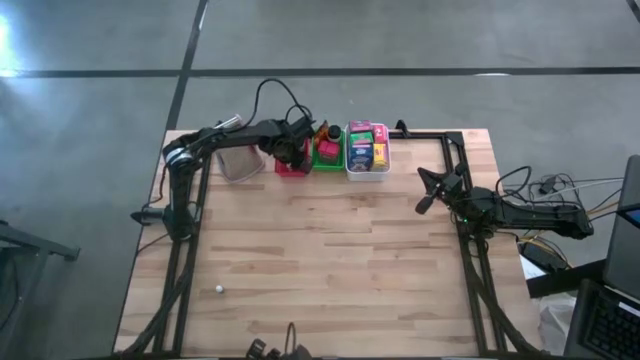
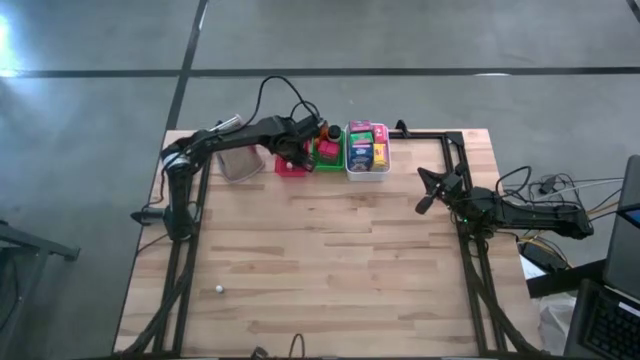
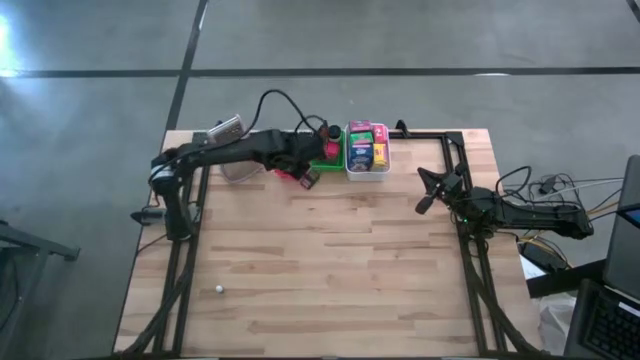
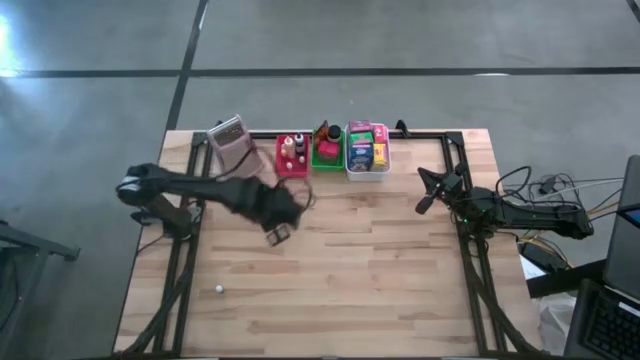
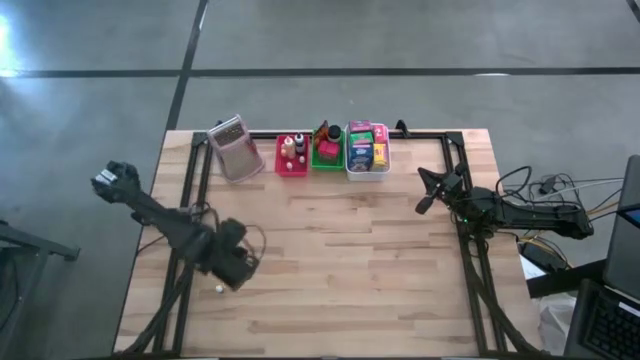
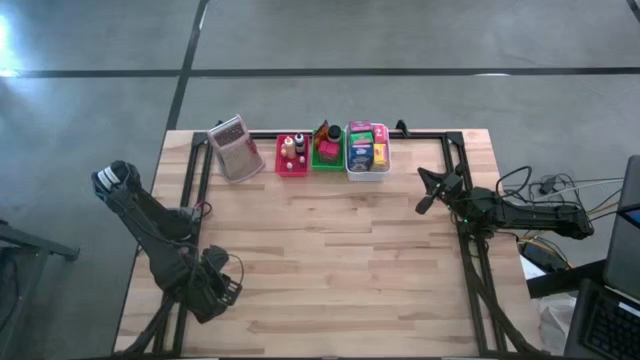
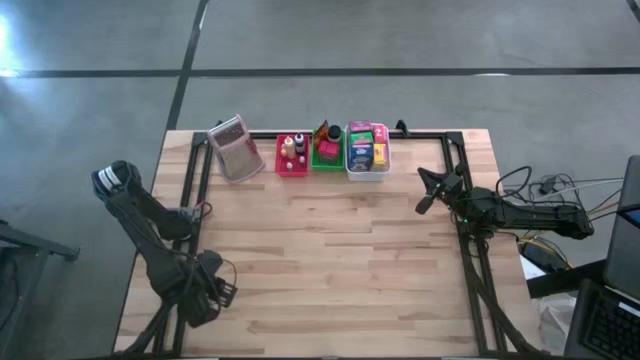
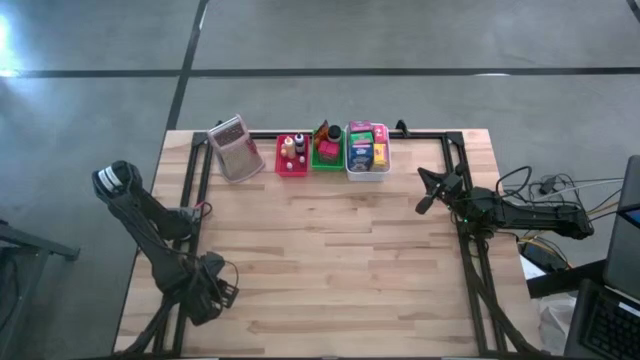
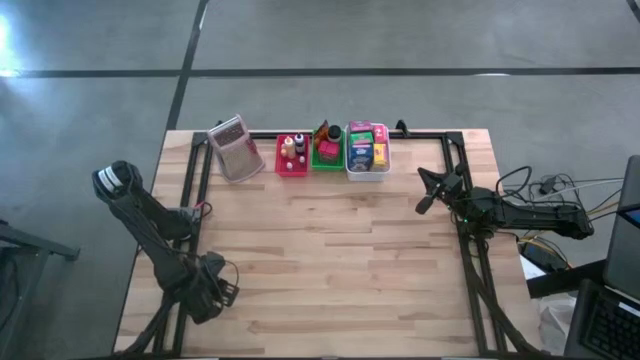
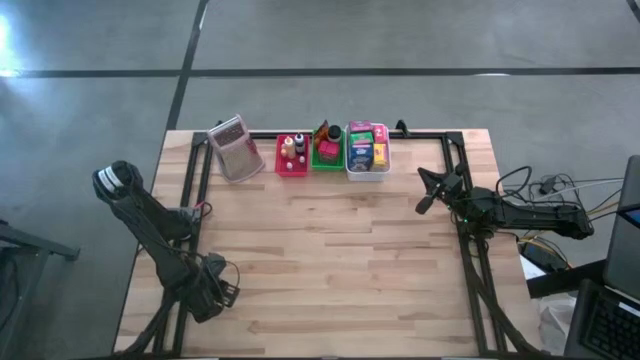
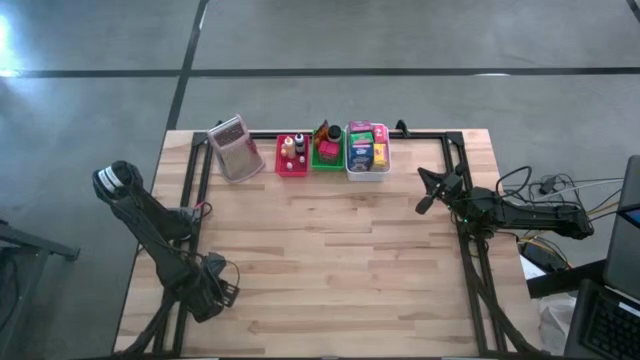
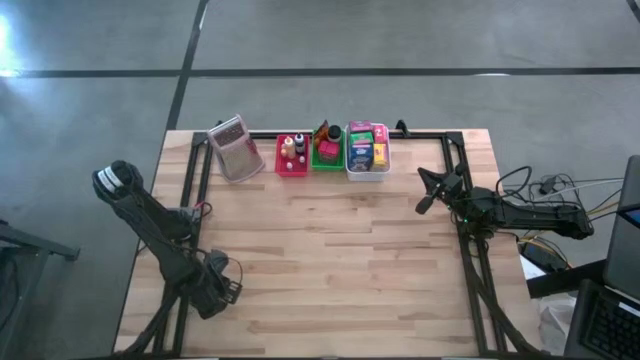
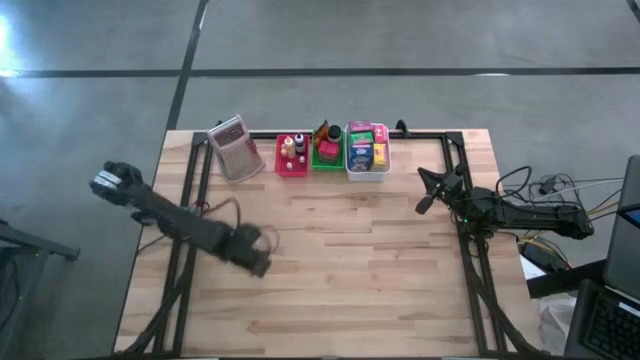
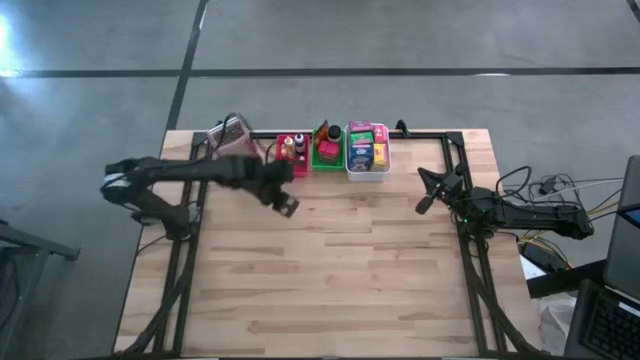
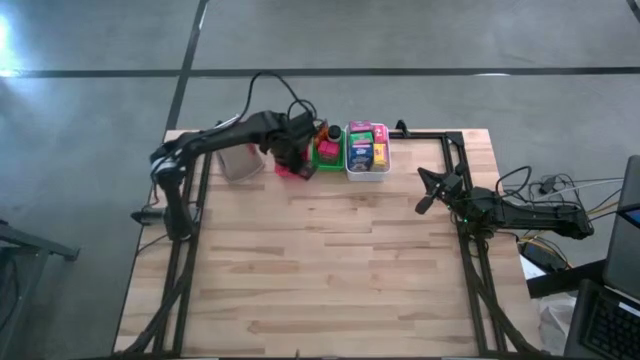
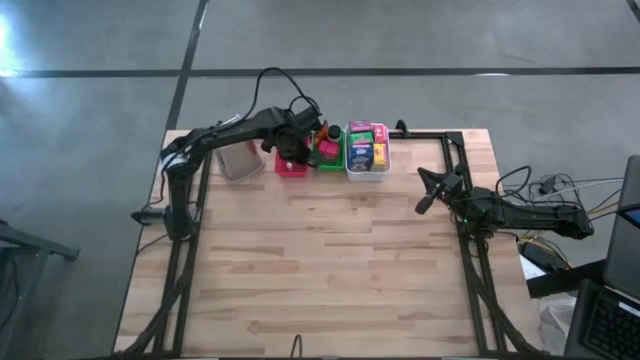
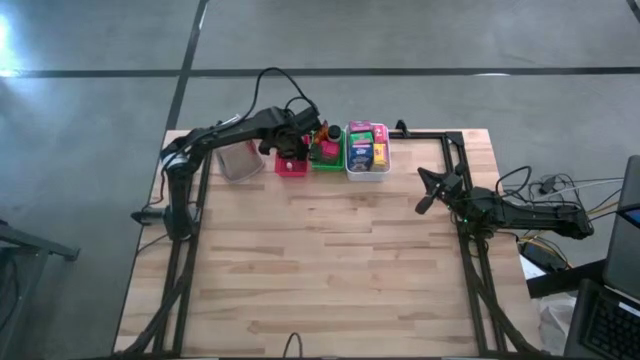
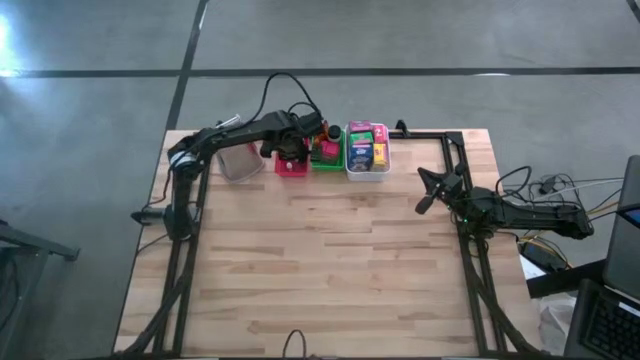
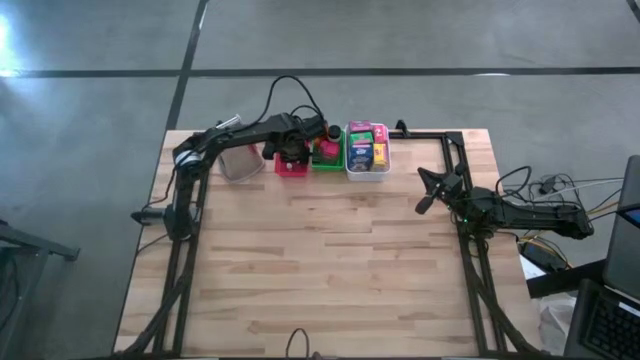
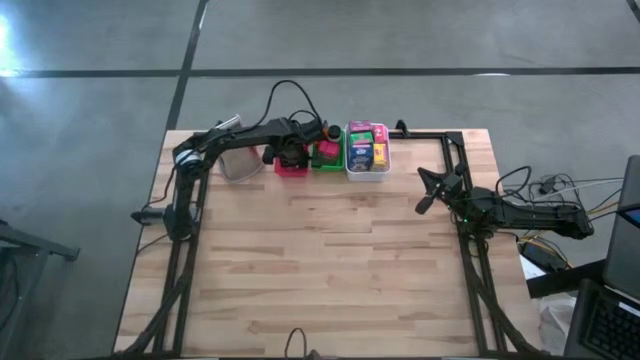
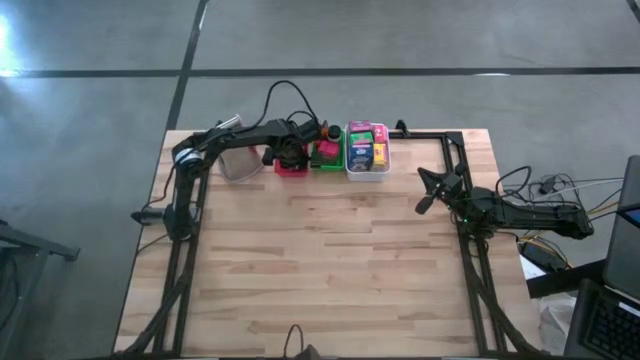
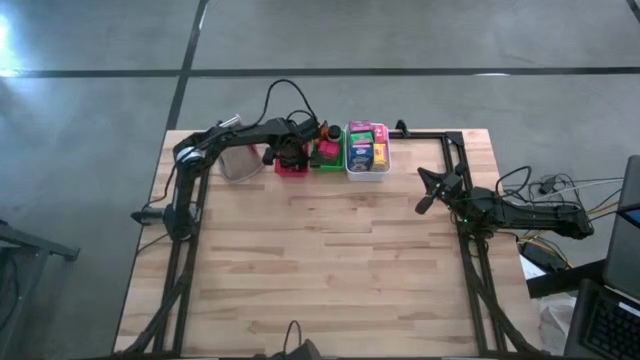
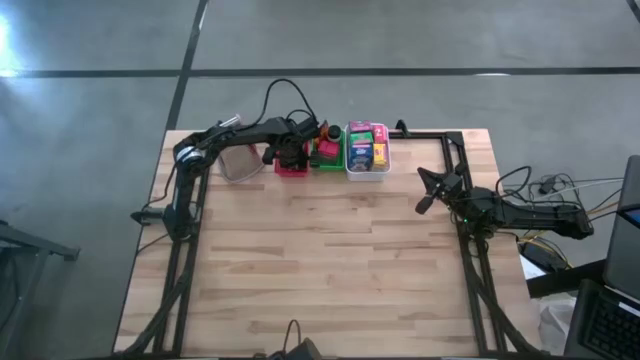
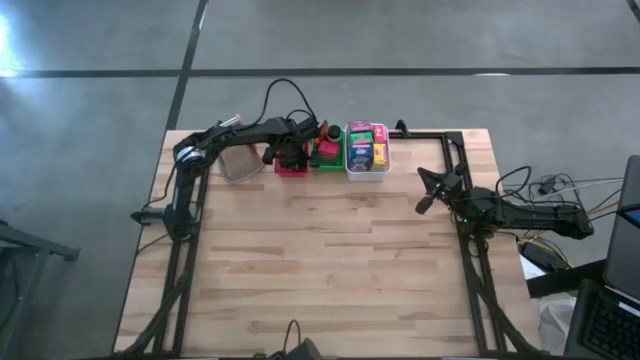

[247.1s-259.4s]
Task: Pick & Place Kitchen Items
Put the small black food coloring bottle into the red bin

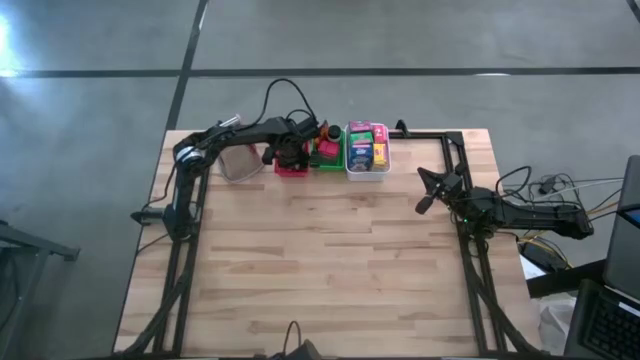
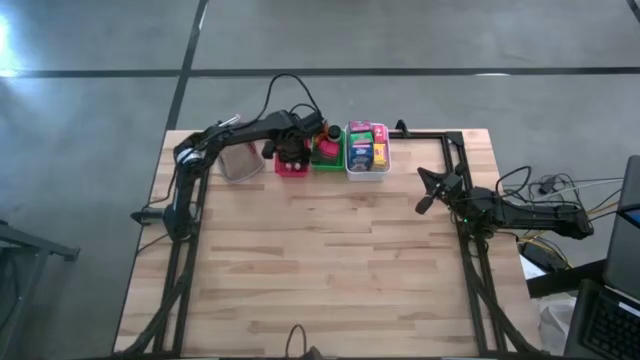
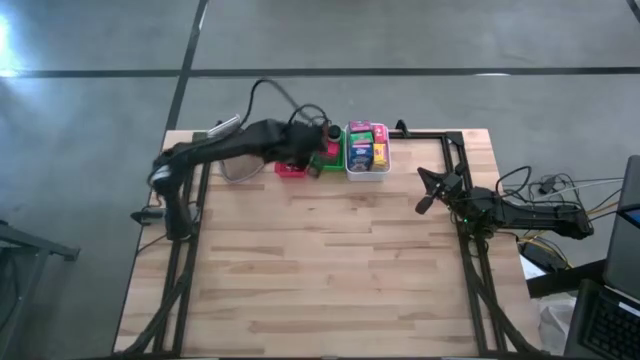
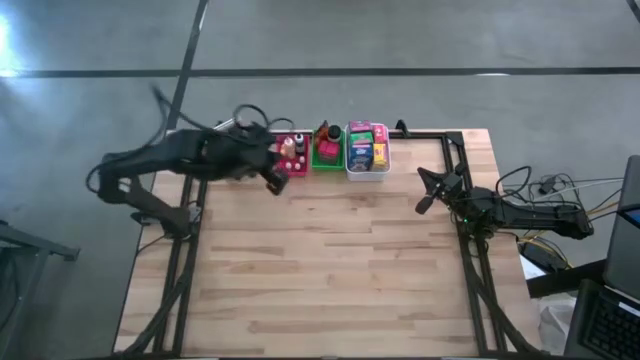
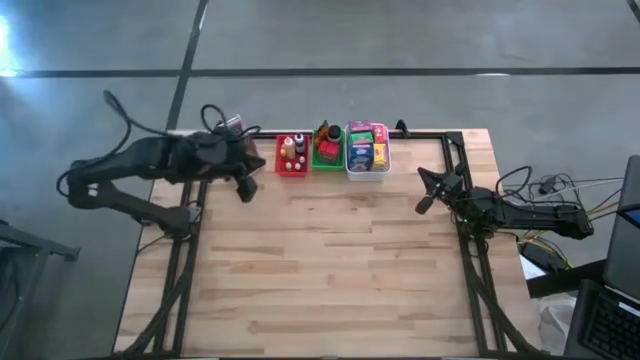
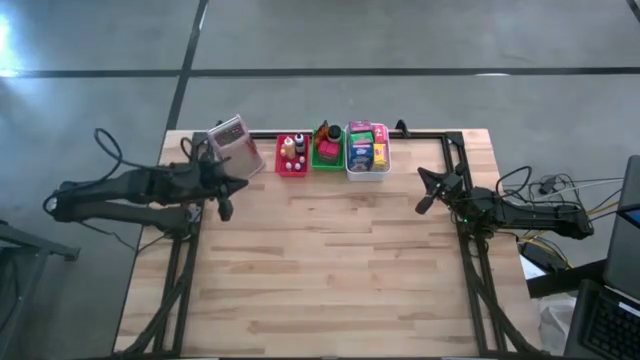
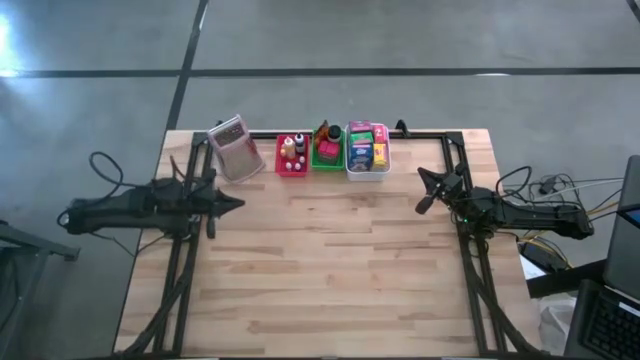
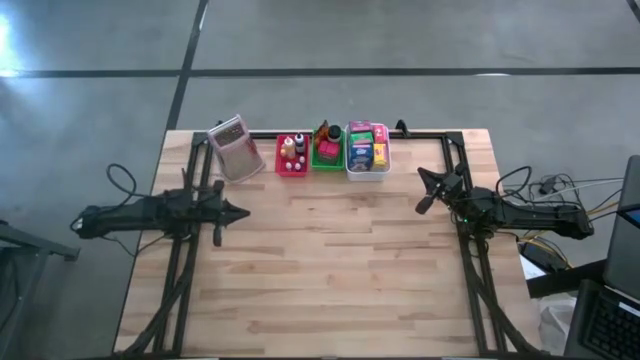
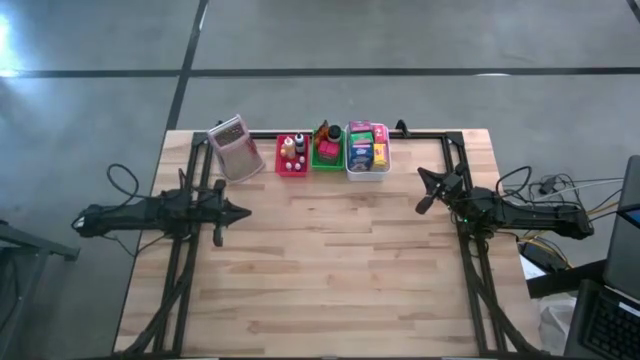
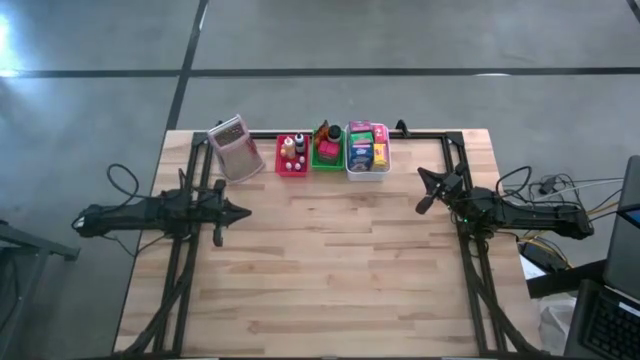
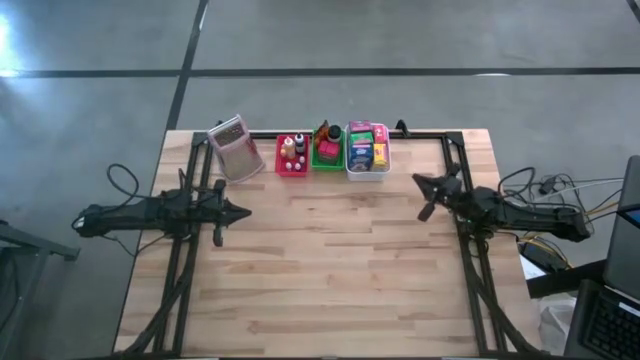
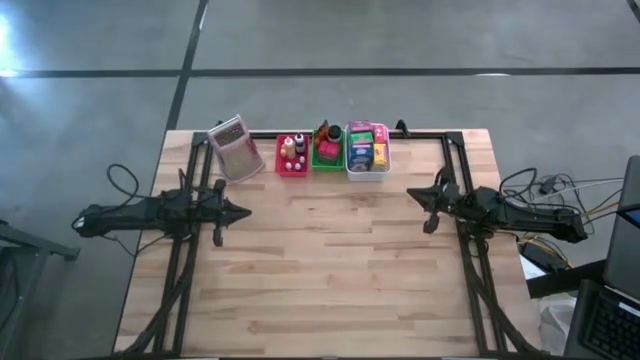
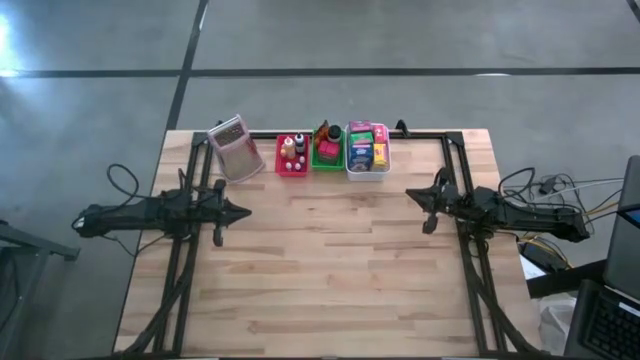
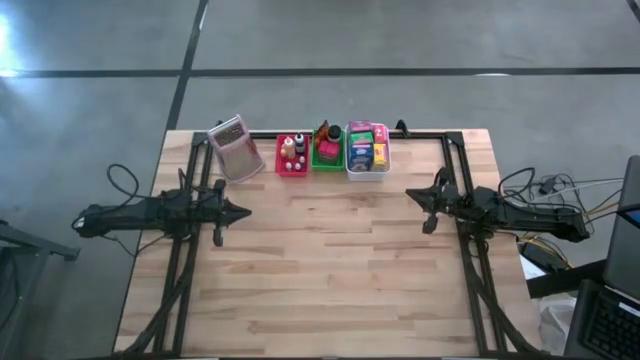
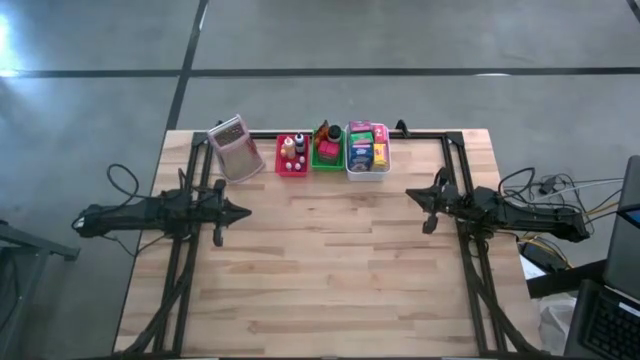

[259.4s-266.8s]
Return to Home Position

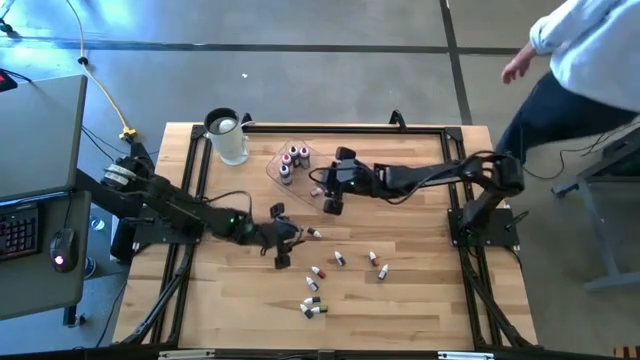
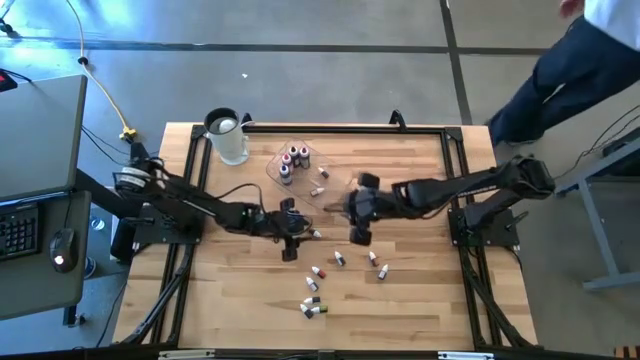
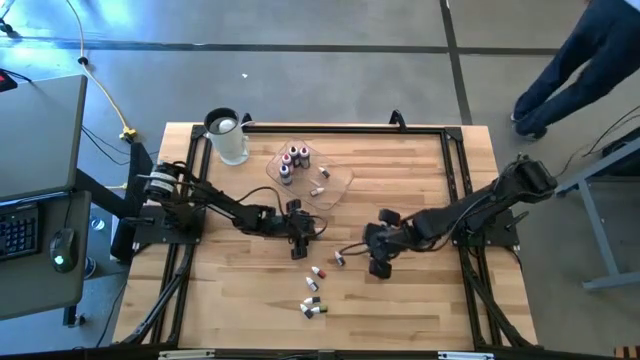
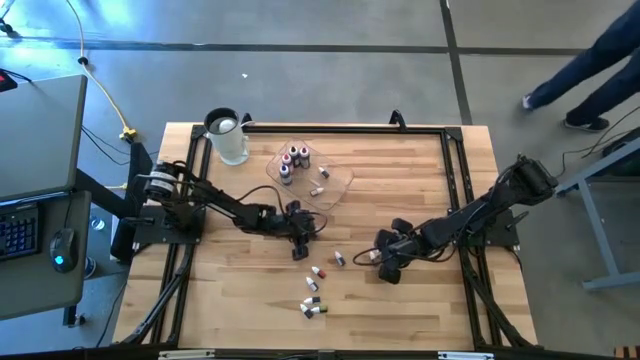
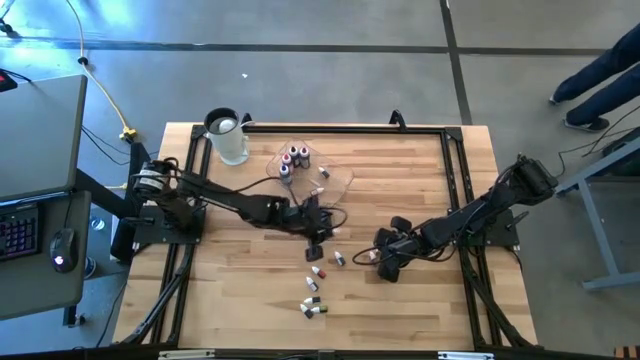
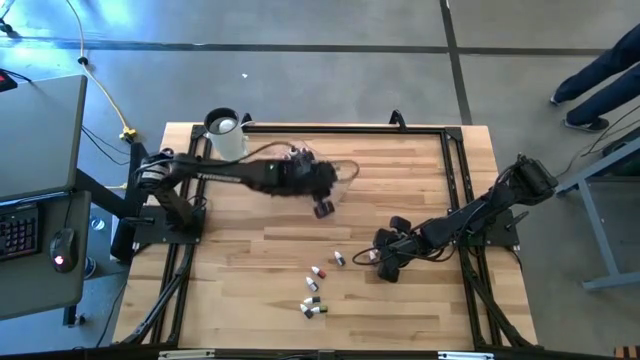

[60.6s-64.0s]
Task: Pick & Place food coloring
Put the right small purple food coloring bottle into the bin
